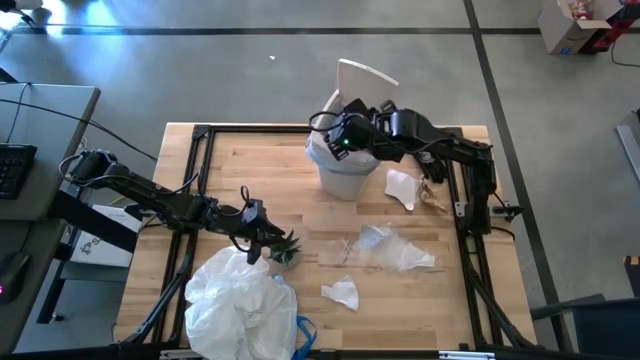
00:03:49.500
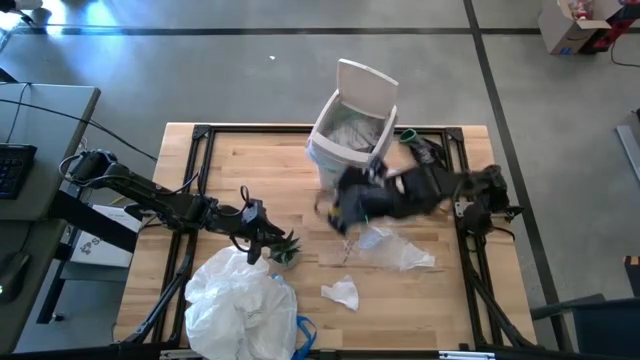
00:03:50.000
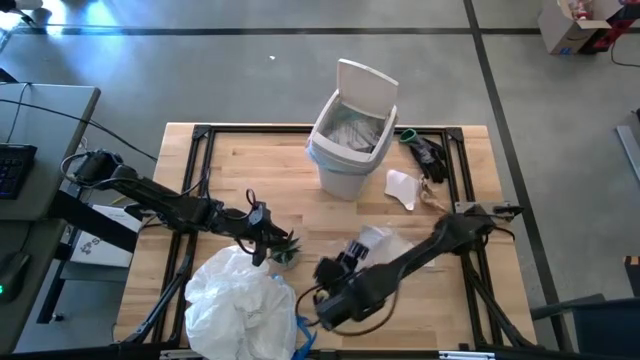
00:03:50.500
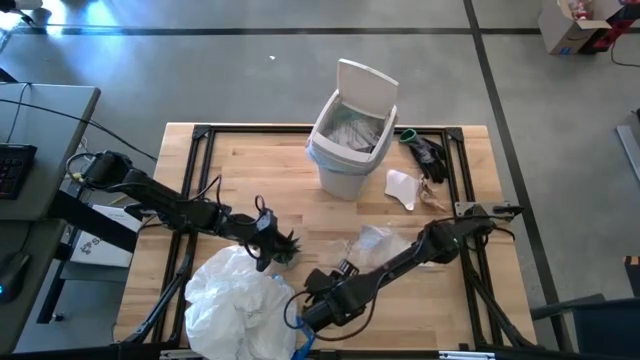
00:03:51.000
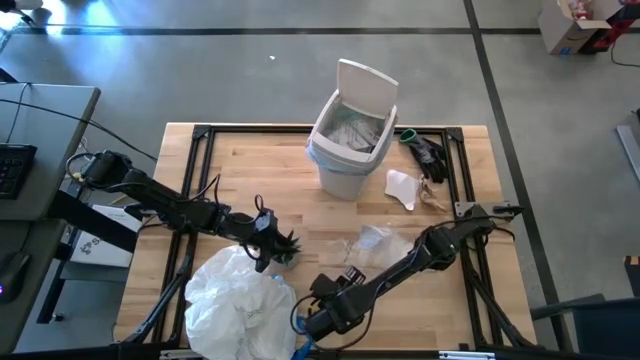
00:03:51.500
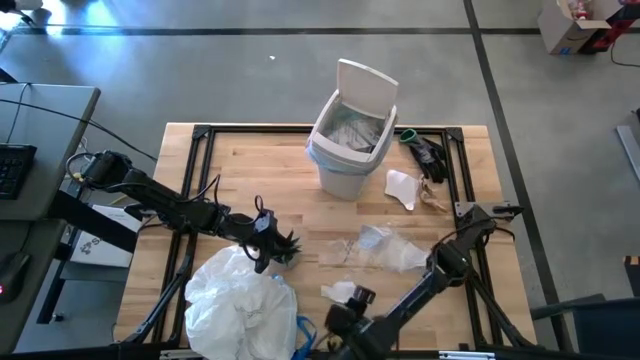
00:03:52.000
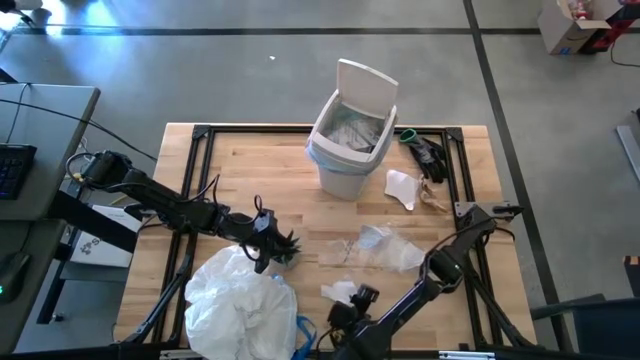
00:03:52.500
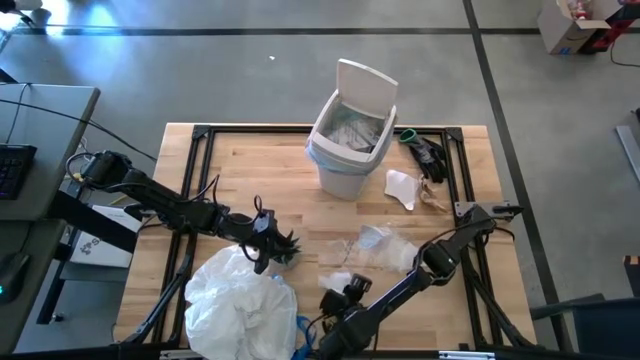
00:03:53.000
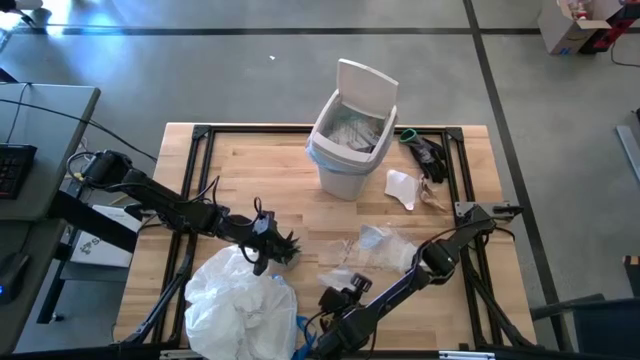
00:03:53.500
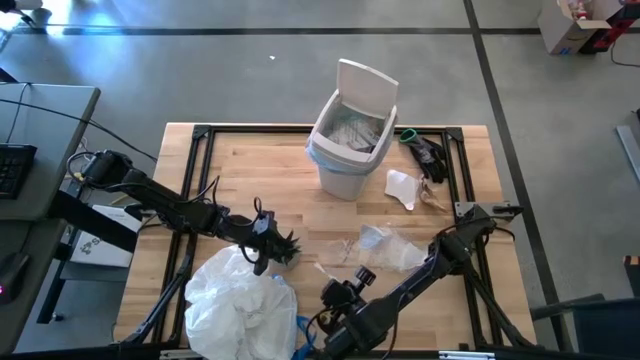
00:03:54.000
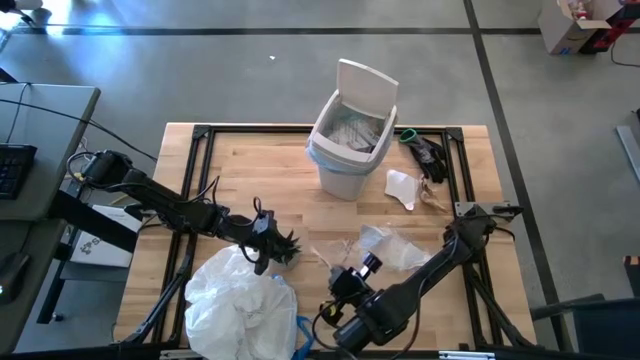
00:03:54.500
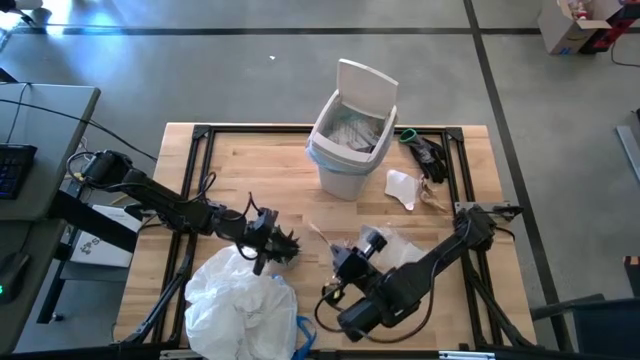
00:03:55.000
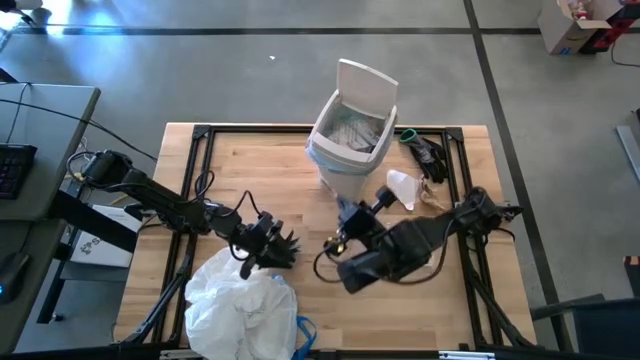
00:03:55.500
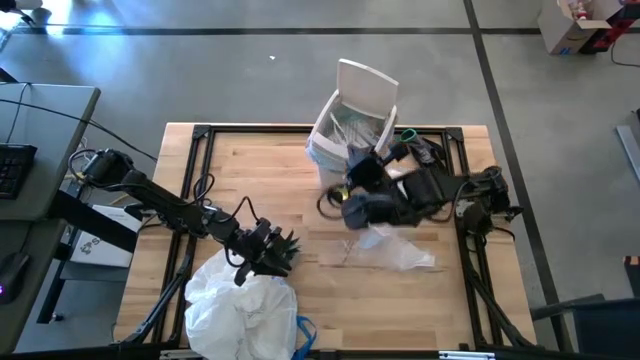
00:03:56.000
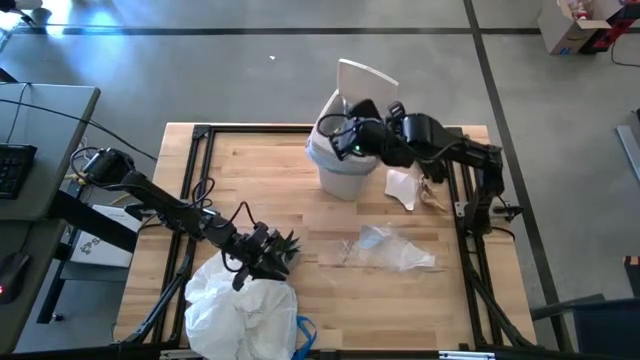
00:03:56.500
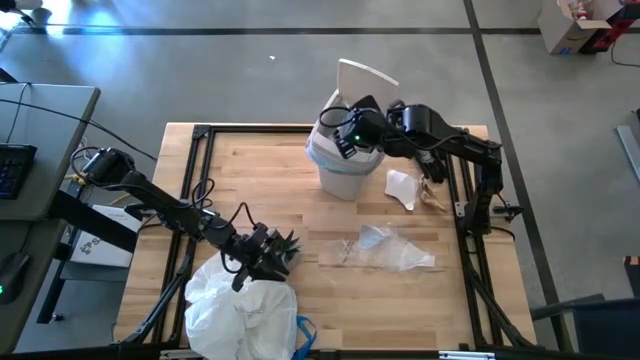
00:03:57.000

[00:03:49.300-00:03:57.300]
Task: place trash/remove bag and relplace
Put the white paper into the trash bin

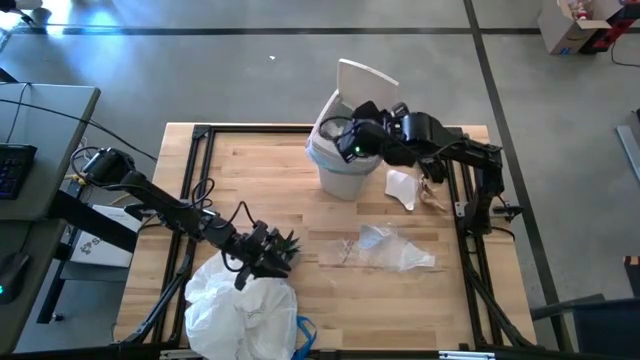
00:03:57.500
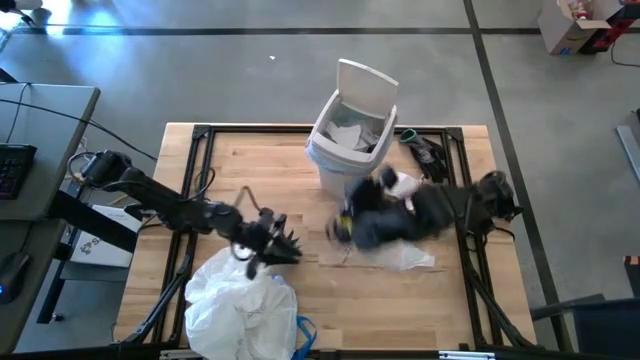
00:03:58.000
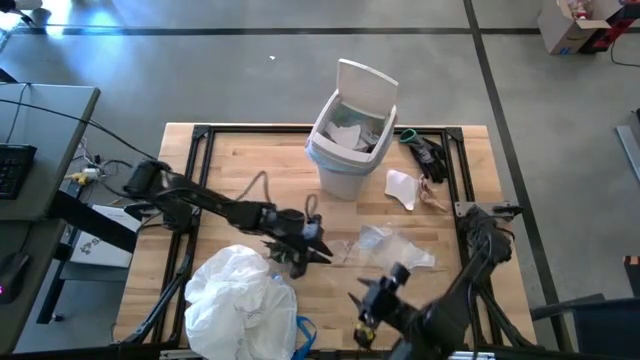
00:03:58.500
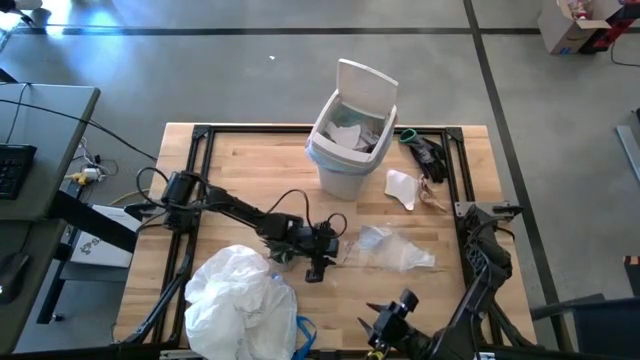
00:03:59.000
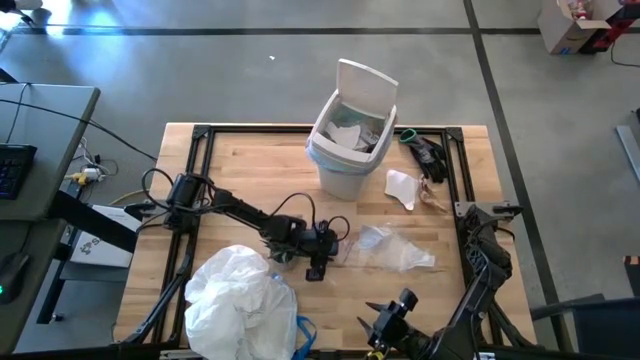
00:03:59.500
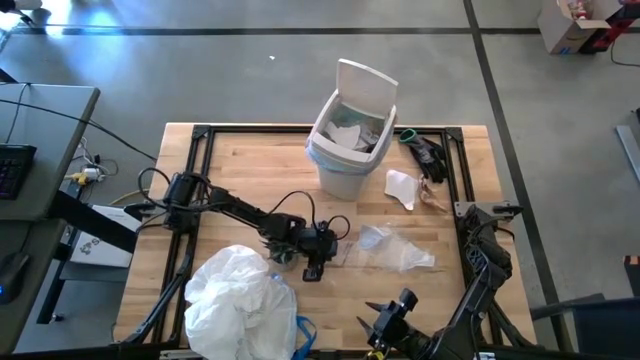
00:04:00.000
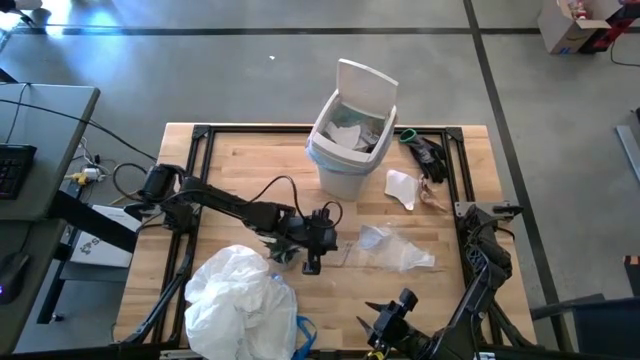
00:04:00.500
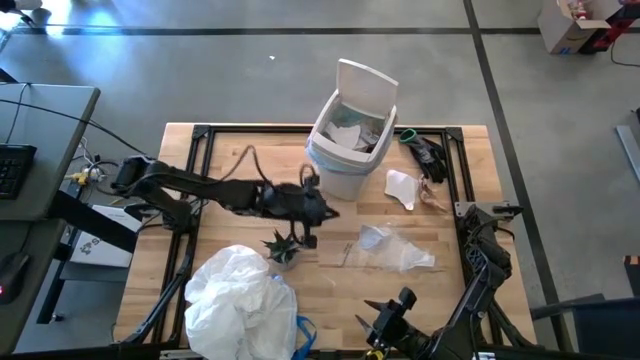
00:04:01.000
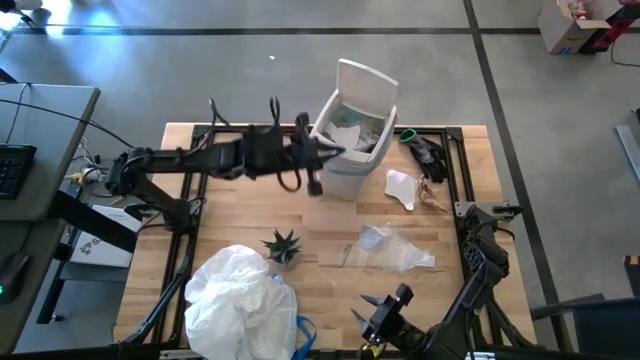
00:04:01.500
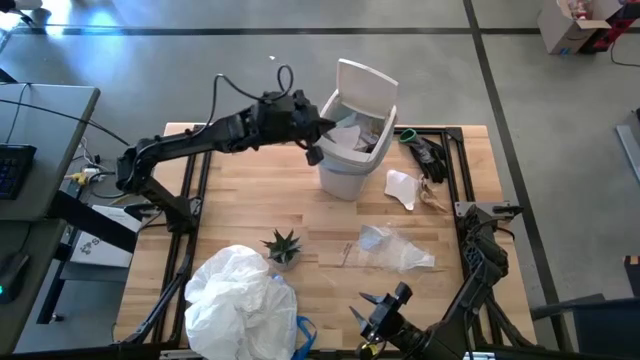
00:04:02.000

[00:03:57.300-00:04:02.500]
Put the transparent plastic into the trash bin

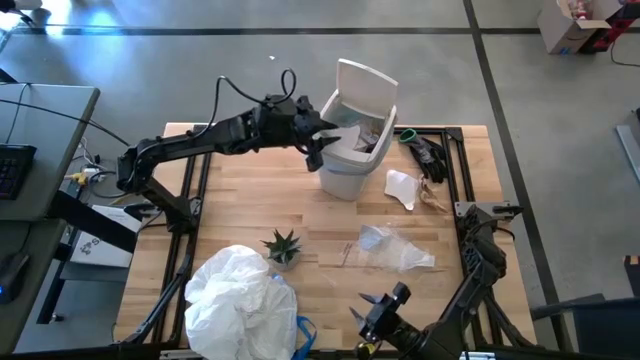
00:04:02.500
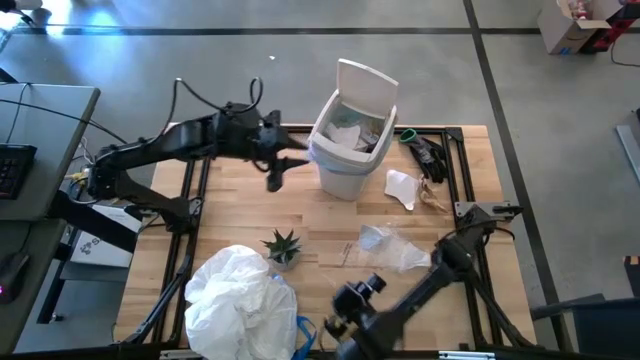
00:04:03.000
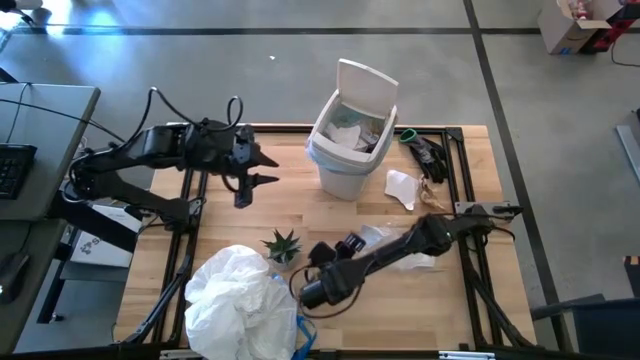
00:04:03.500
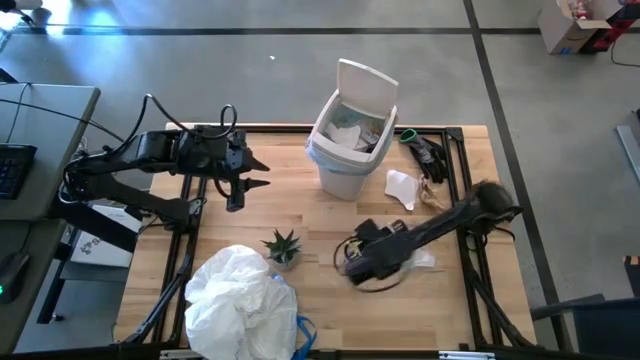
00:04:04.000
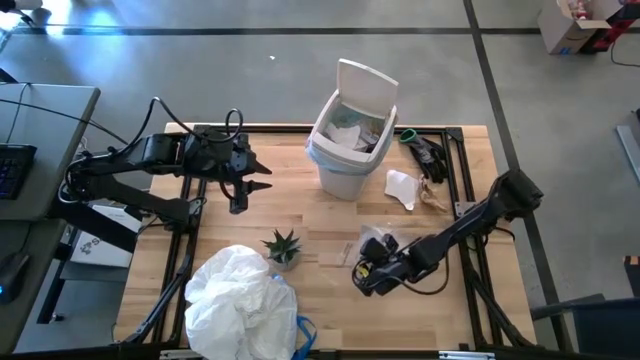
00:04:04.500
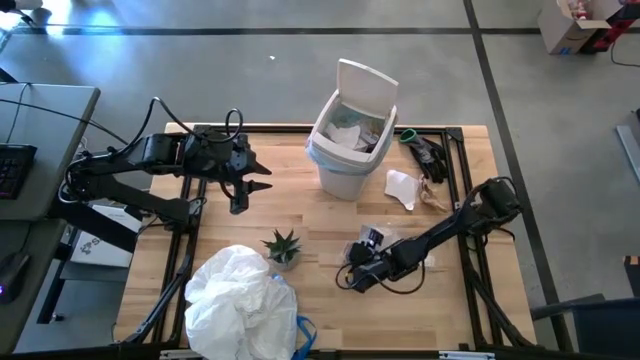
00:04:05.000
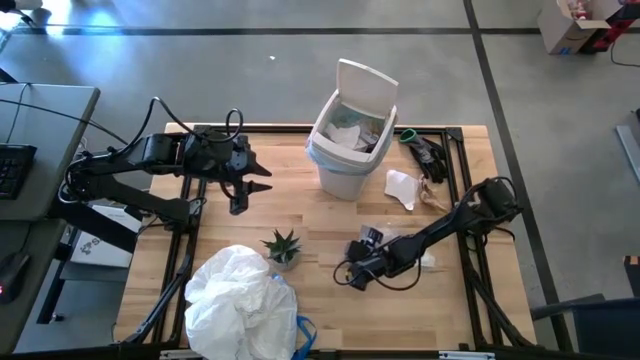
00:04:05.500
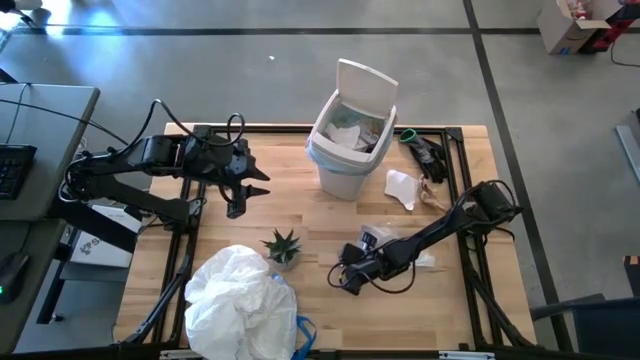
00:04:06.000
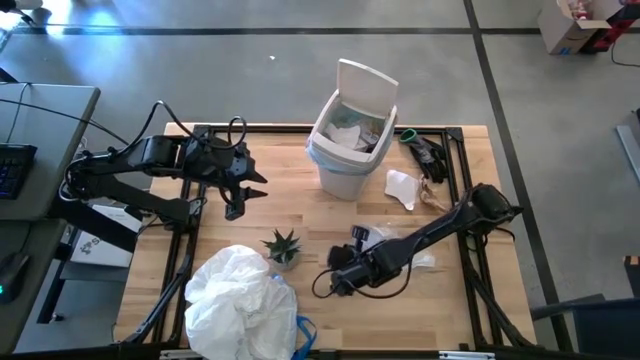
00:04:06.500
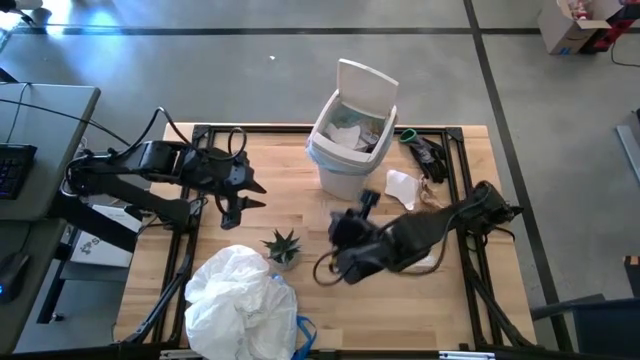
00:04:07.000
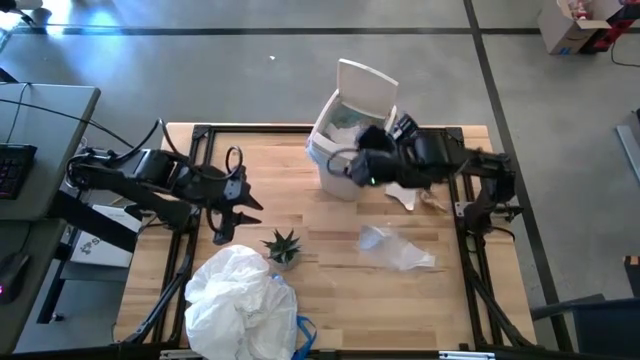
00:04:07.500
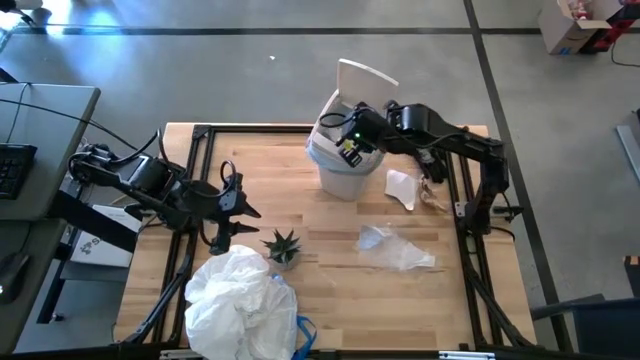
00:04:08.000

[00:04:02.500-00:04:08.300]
Put the transparent plastic into the trash bin

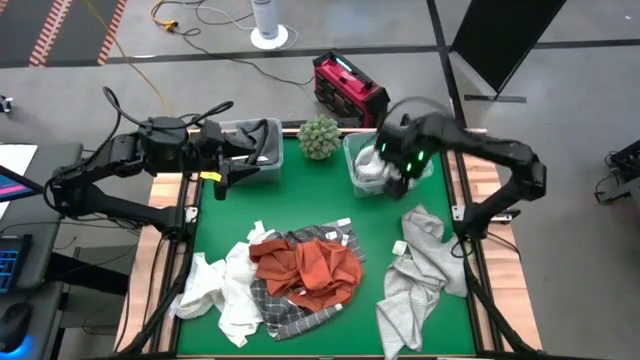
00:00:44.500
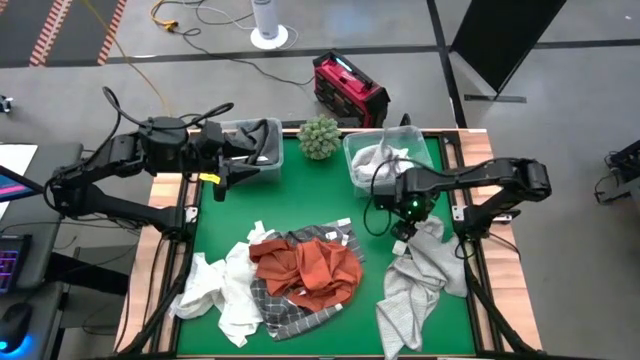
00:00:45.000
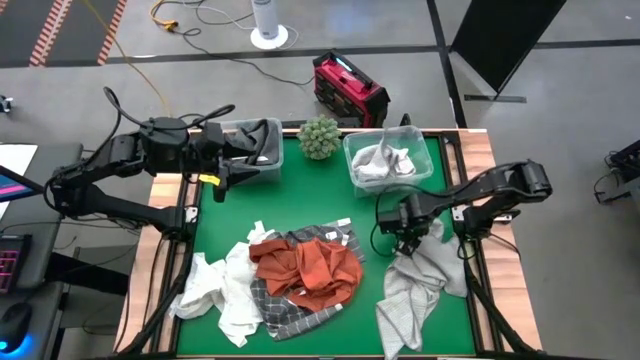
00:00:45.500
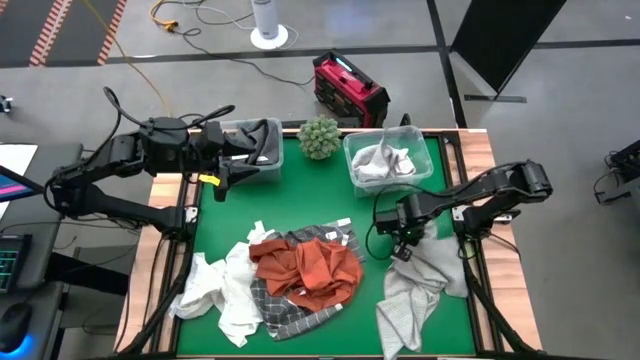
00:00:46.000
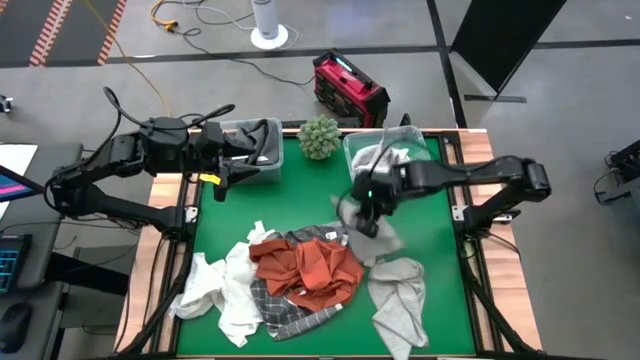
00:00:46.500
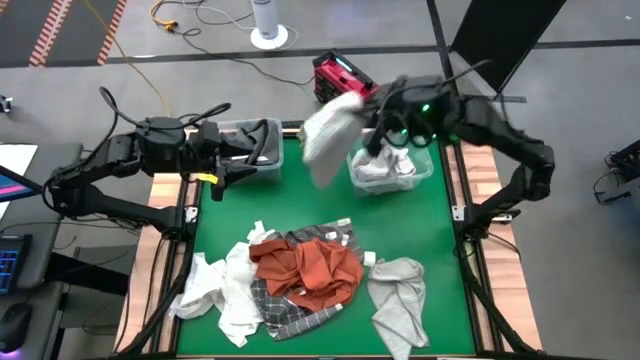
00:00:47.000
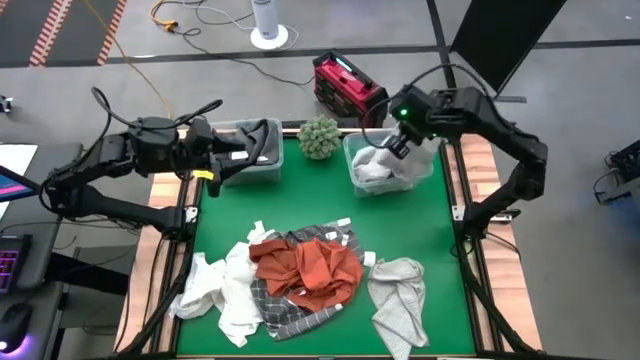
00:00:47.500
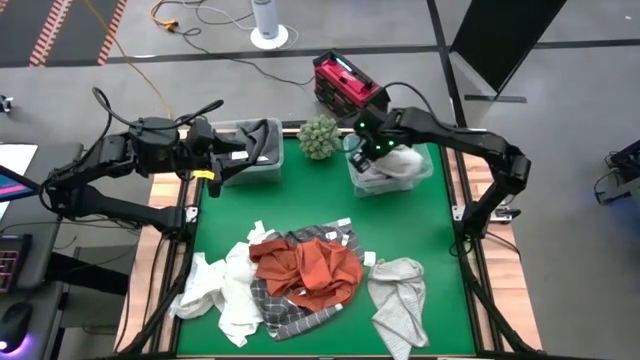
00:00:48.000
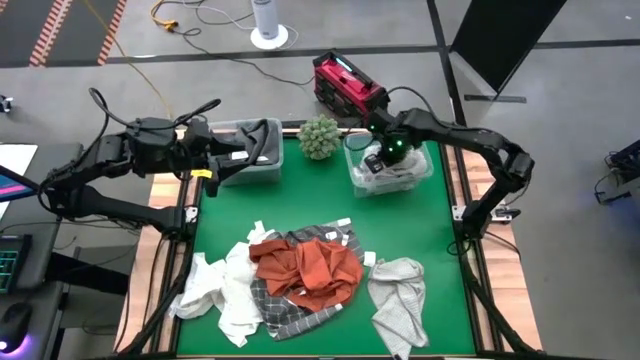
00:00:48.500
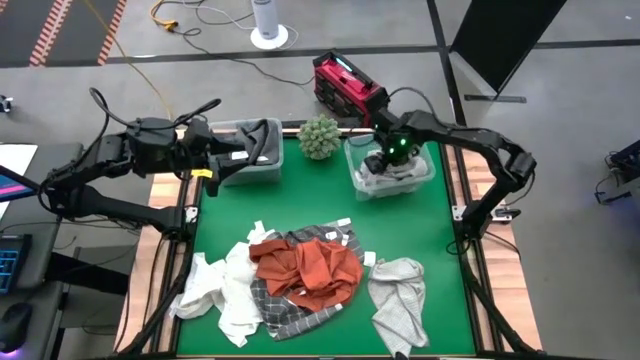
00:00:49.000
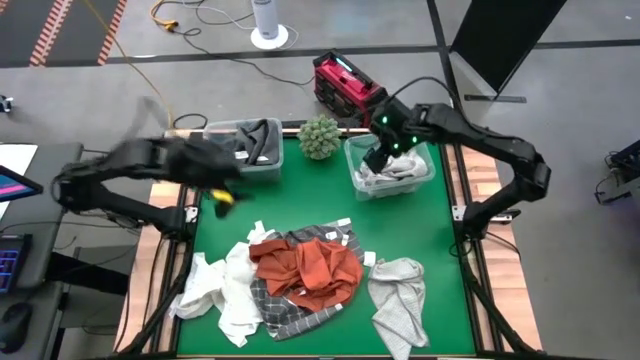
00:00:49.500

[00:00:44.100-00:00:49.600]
Task: Sort towels by color in basket
Put the gray towel into the right transparent bin
